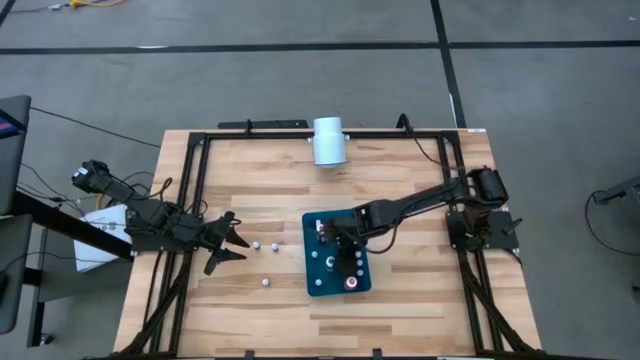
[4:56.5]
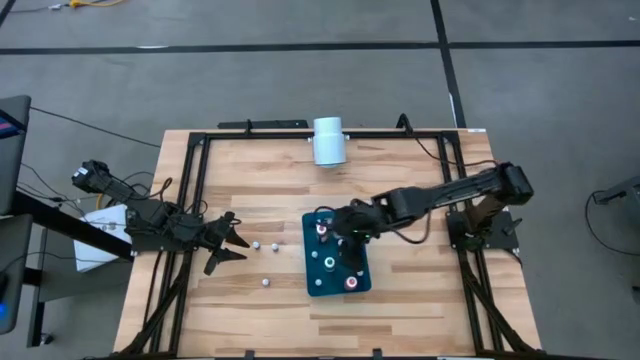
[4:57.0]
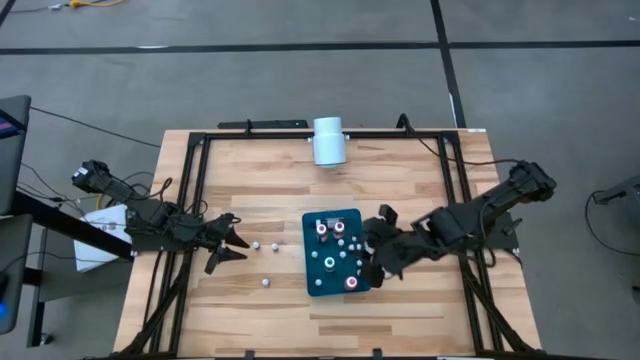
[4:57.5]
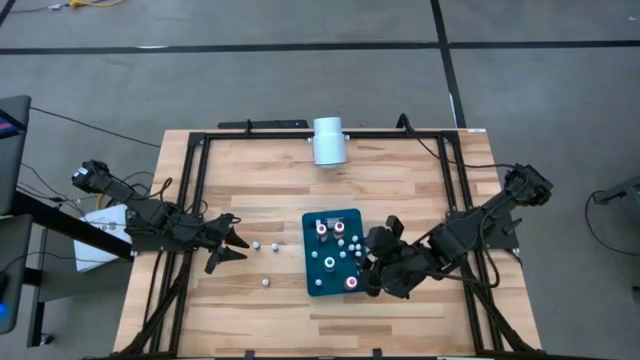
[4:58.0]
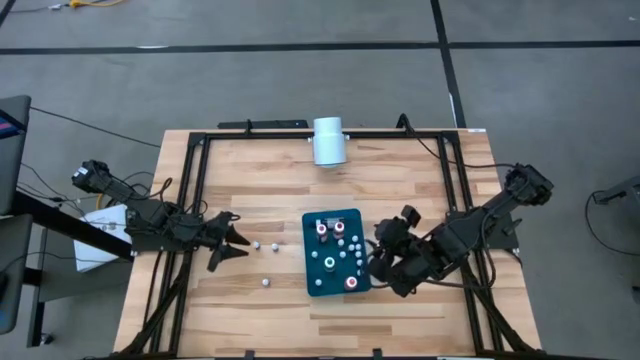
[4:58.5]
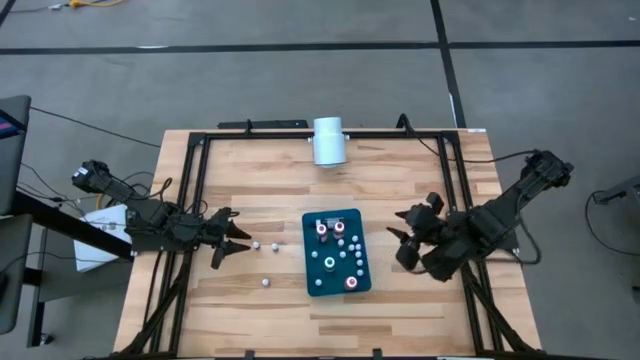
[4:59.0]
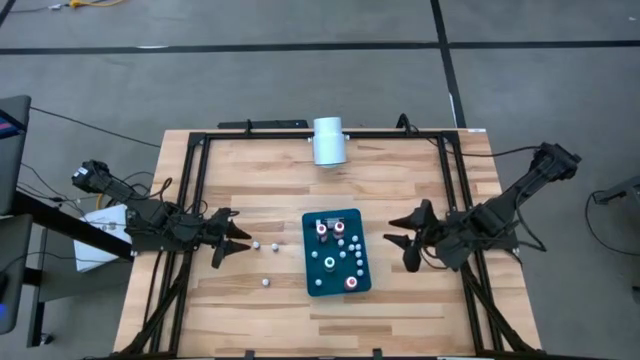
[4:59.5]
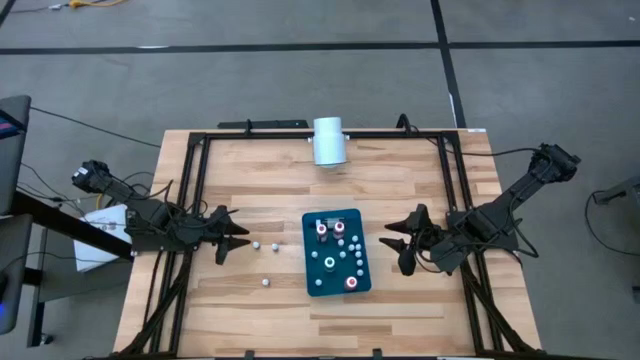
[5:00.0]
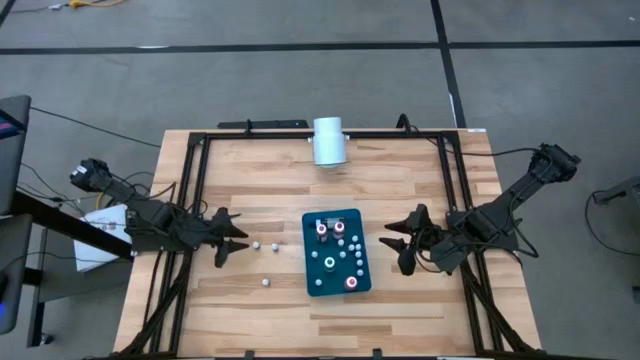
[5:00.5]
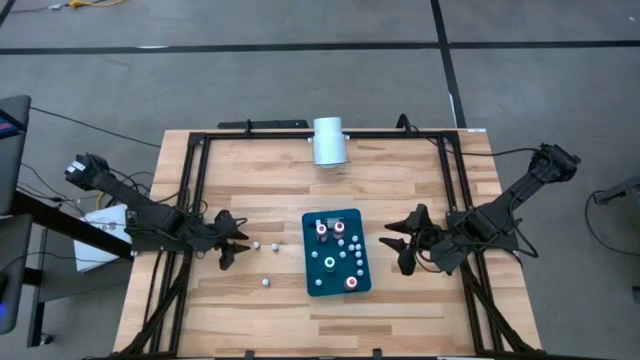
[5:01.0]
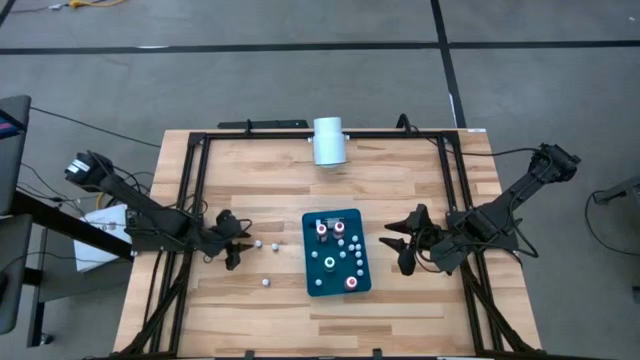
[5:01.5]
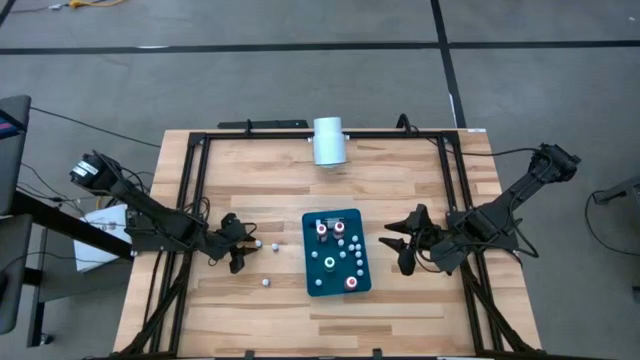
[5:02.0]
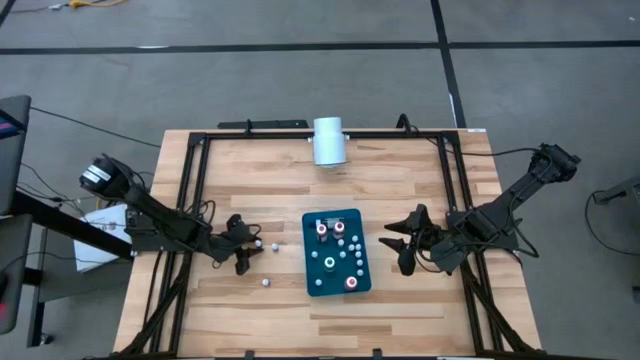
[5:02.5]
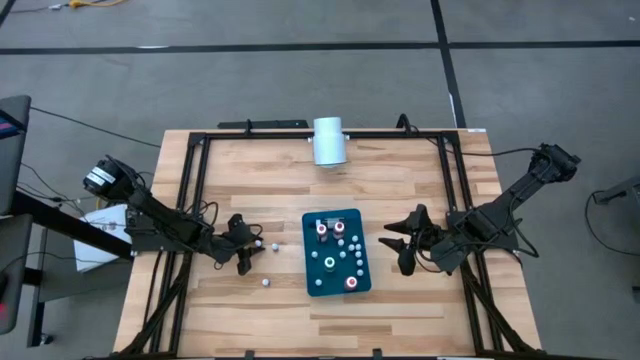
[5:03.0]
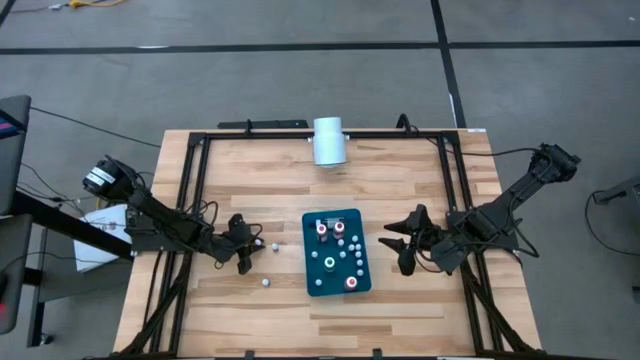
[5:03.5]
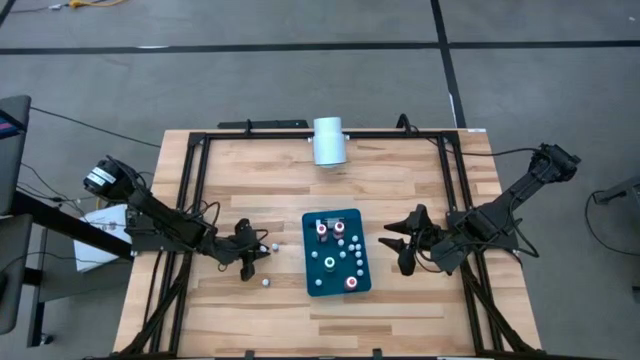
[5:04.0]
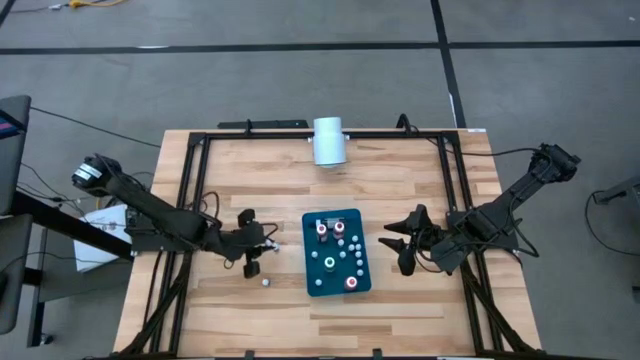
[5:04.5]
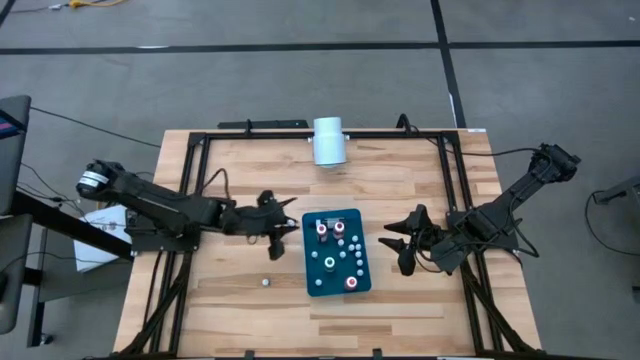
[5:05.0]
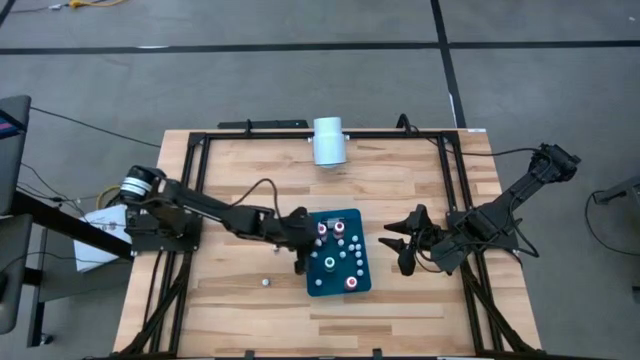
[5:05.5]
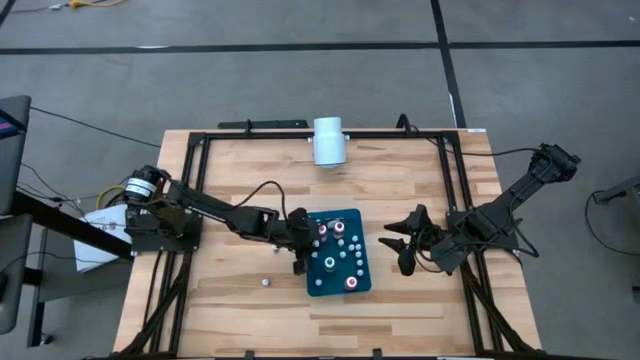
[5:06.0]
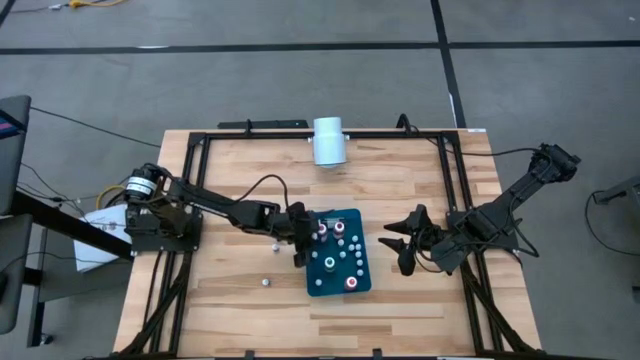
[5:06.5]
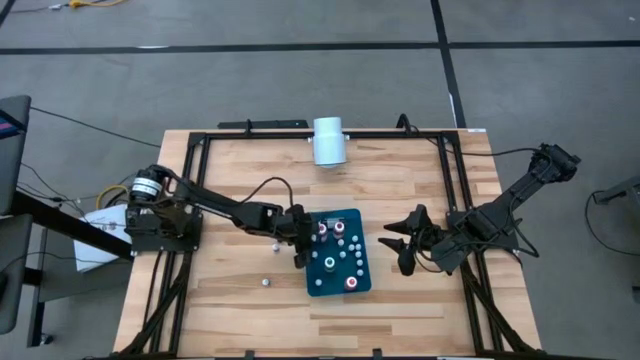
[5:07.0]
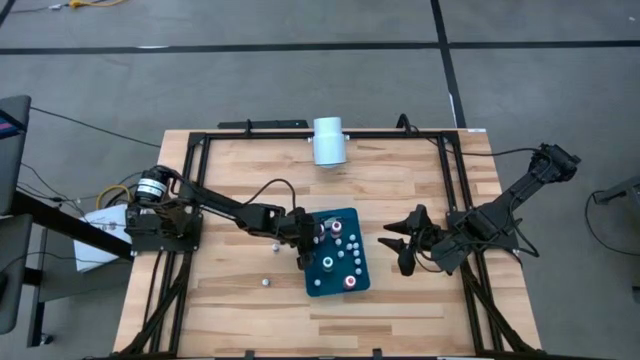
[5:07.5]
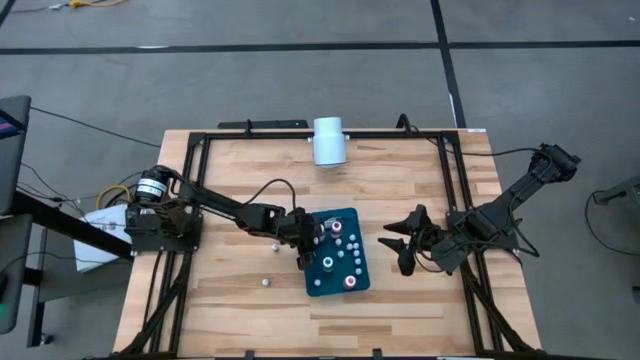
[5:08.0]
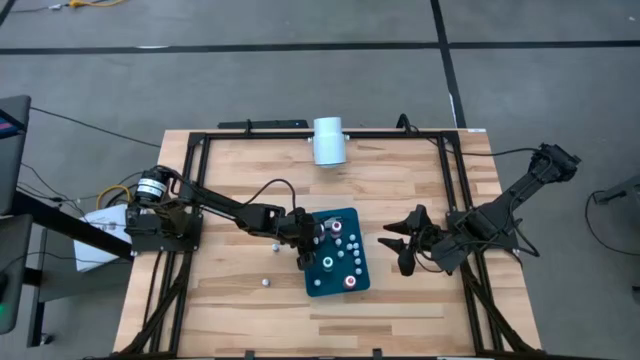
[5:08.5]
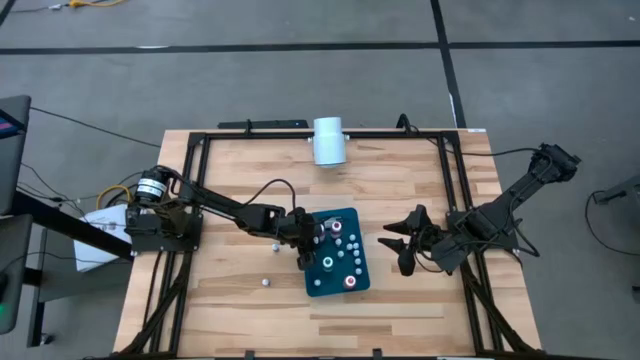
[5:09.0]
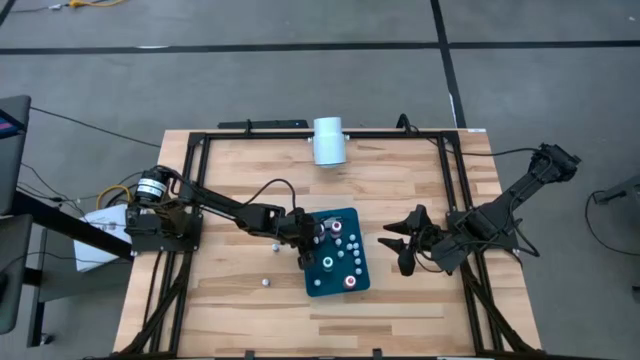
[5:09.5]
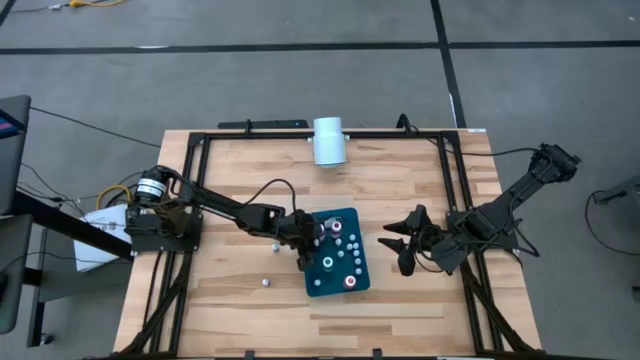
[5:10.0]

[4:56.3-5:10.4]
Task: Pick & Place food coloring
Put the small green food coloring bottle into the blue bin

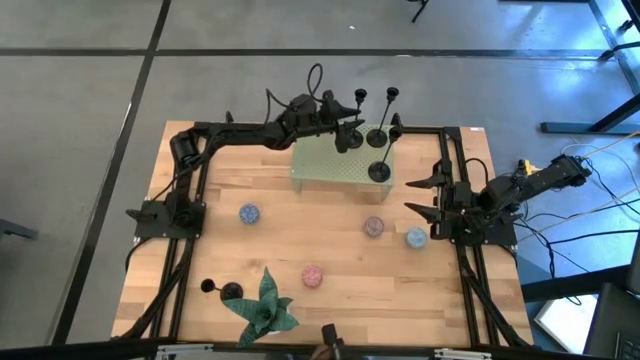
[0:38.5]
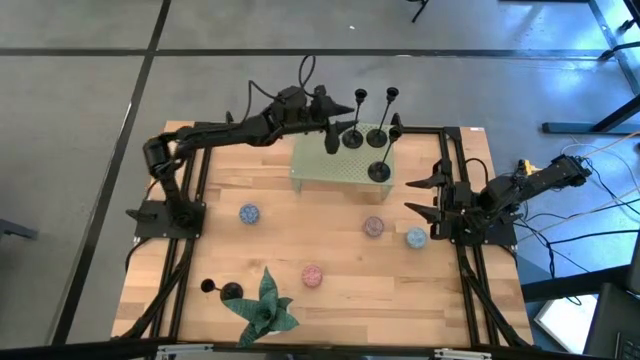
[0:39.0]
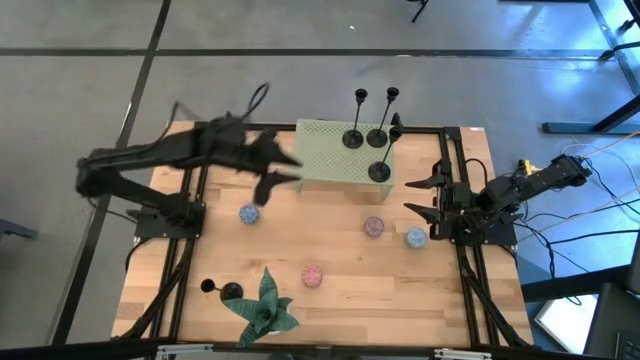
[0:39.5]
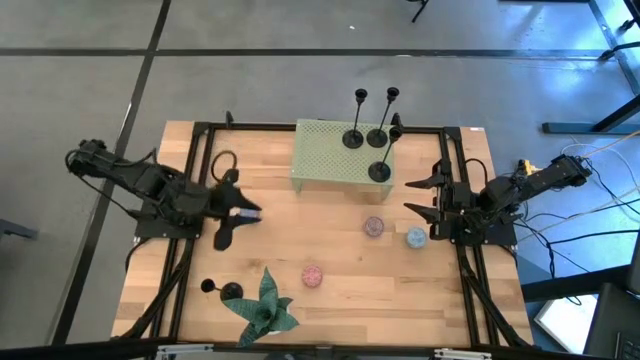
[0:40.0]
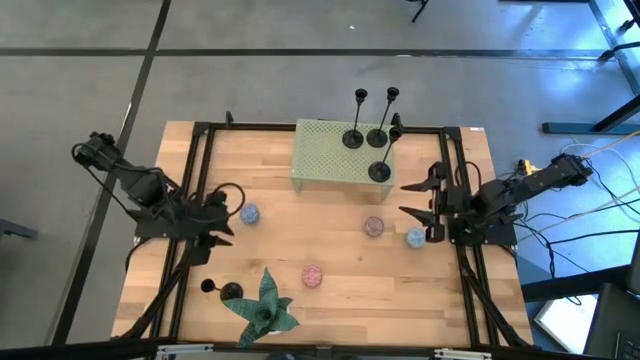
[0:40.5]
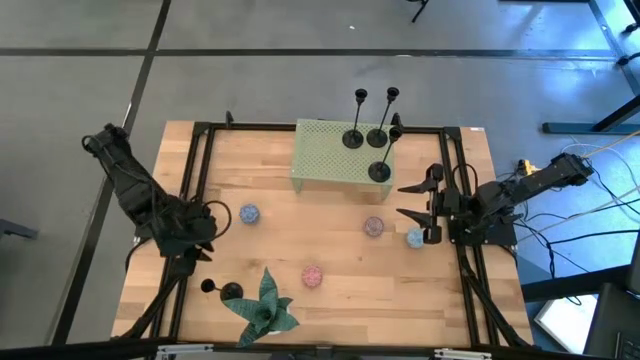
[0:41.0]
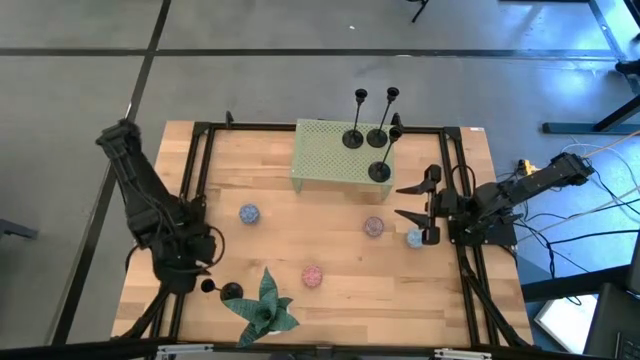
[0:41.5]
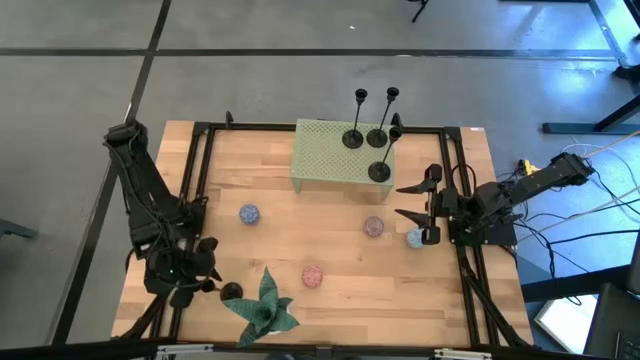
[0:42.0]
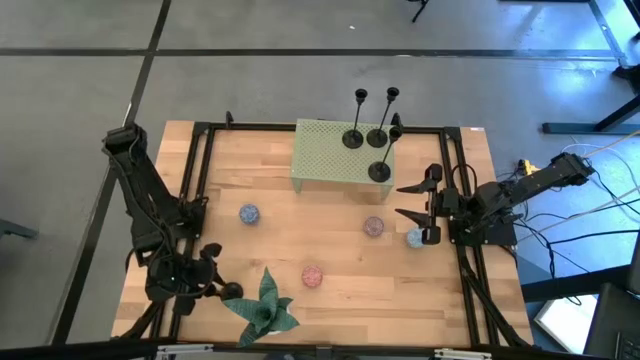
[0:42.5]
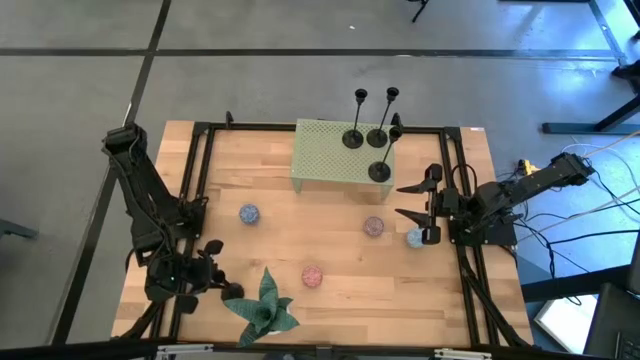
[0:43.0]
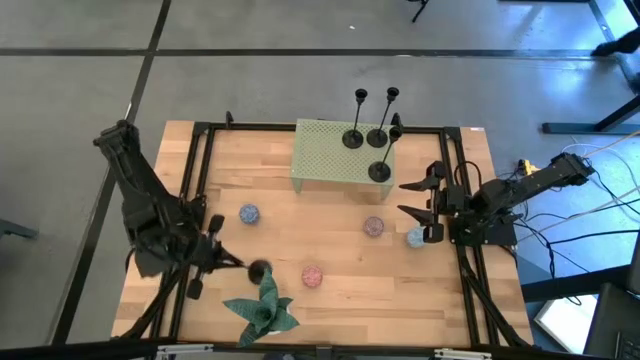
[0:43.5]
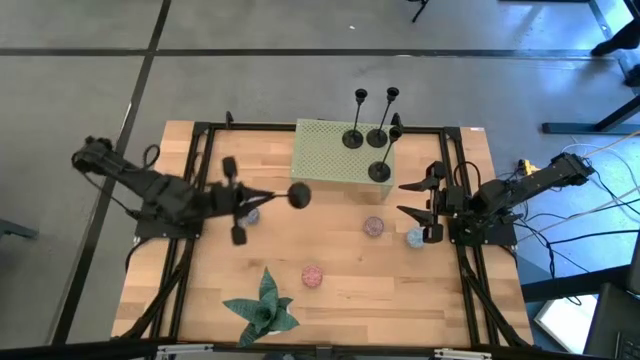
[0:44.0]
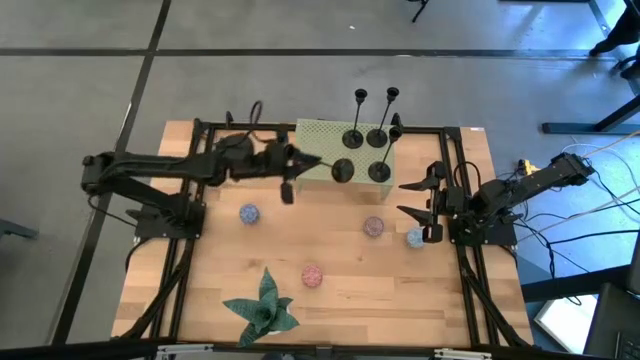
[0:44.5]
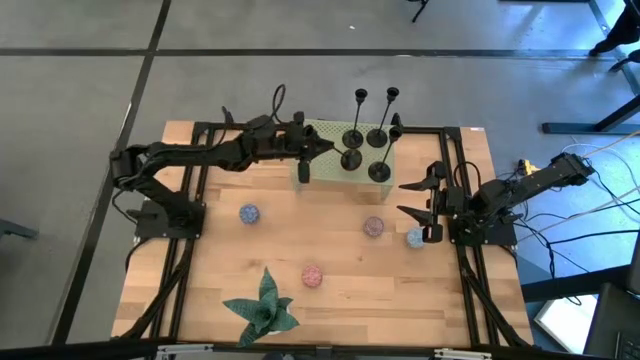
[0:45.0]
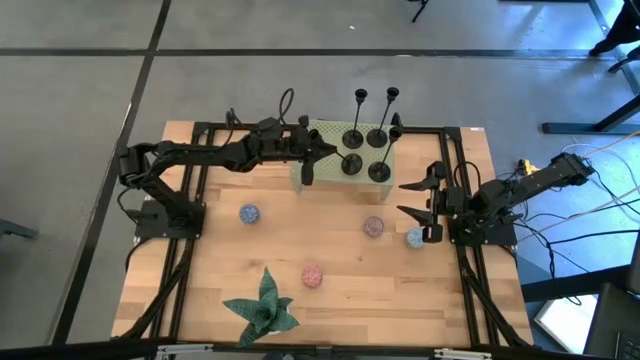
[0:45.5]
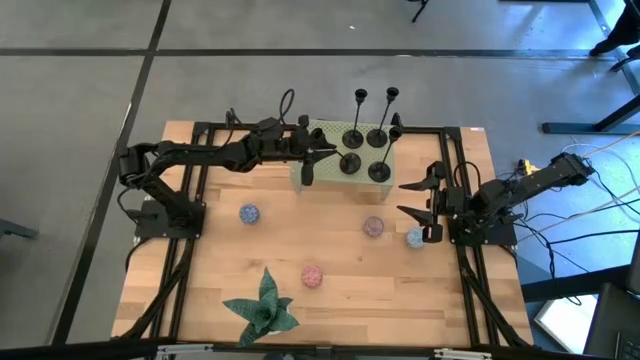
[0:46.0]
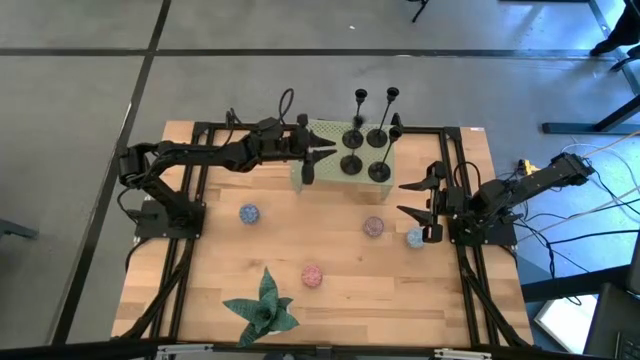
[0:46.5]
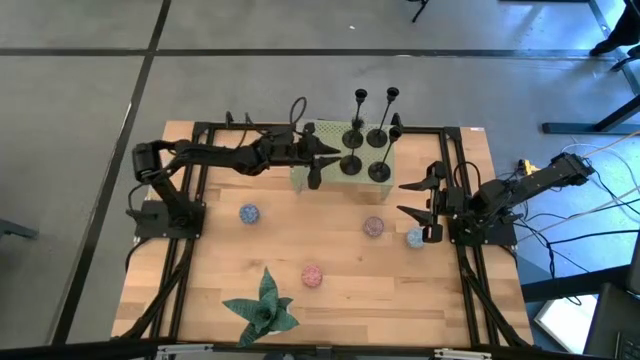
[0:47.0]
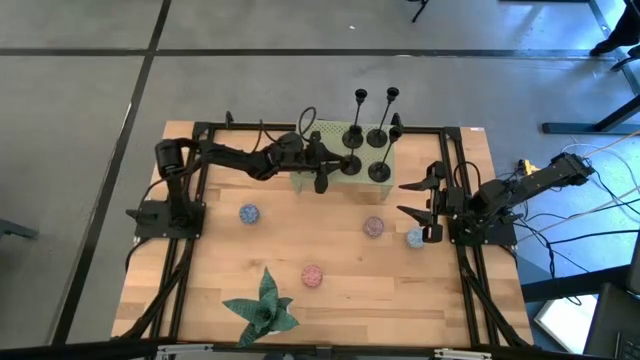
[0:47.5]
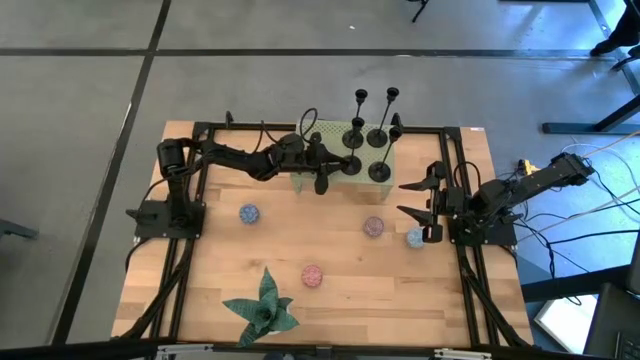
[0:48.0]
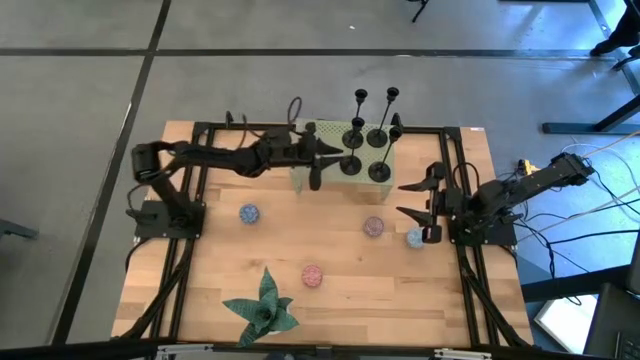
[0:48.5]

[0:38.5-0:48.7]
Task: Pick & Place candle stick holders
Put the black candle holder on the shelf
